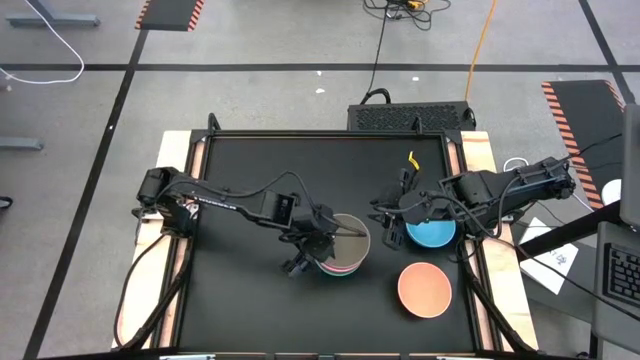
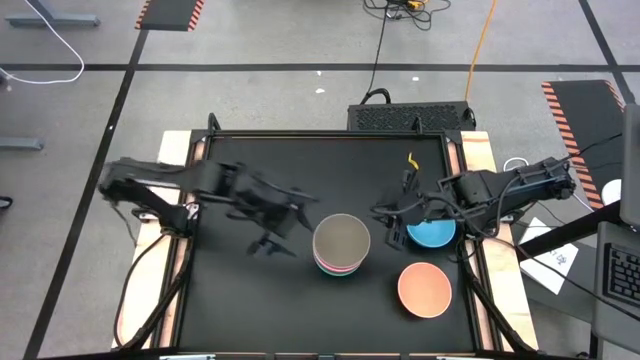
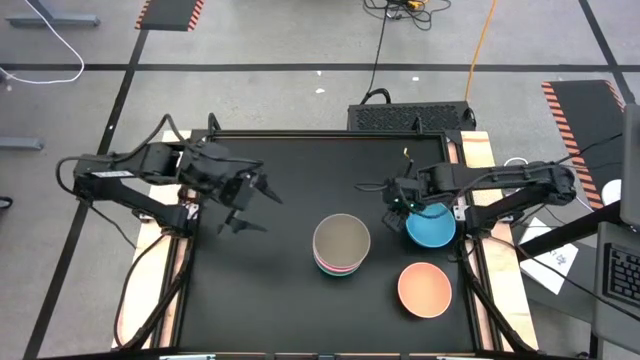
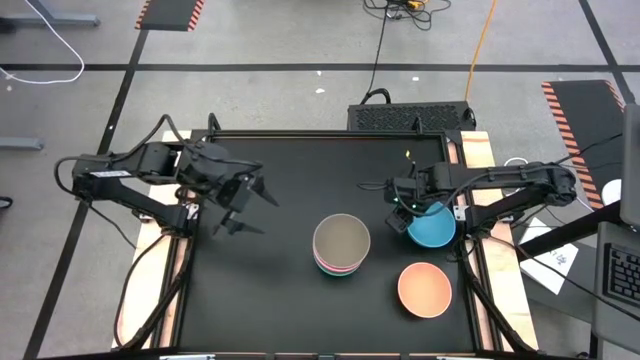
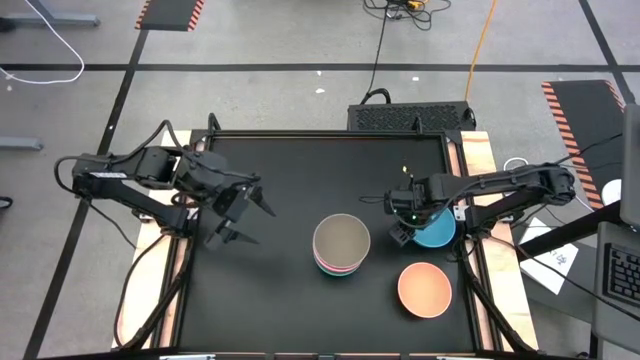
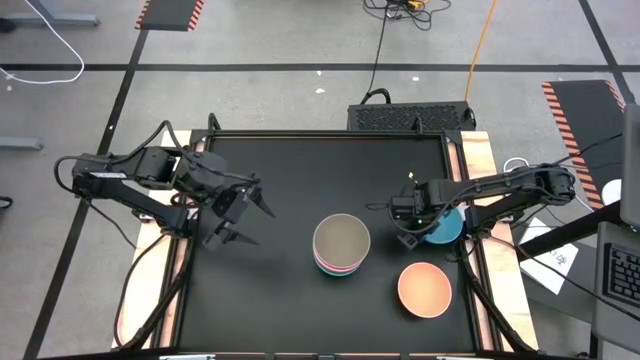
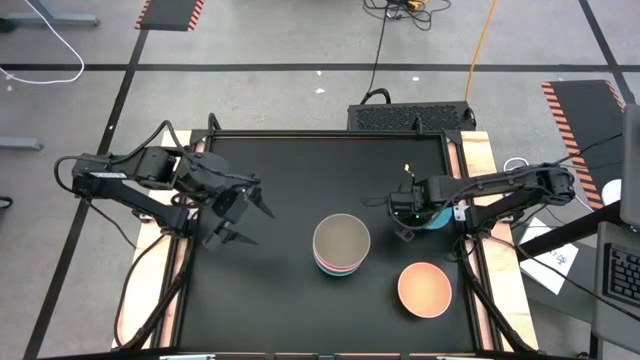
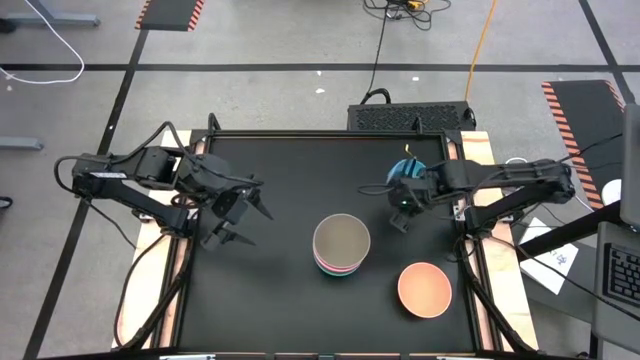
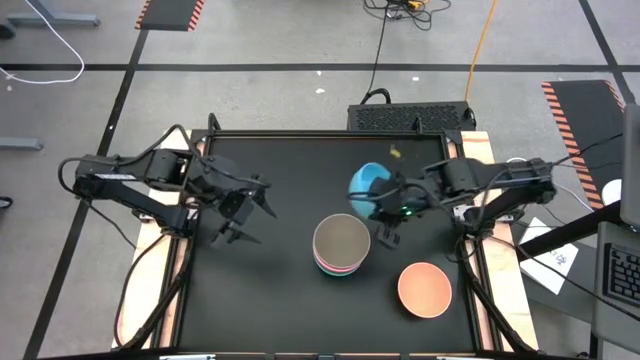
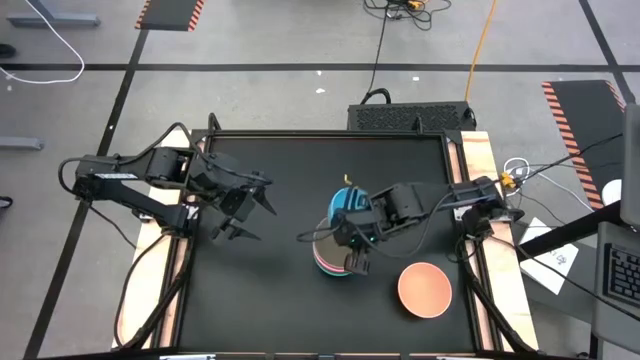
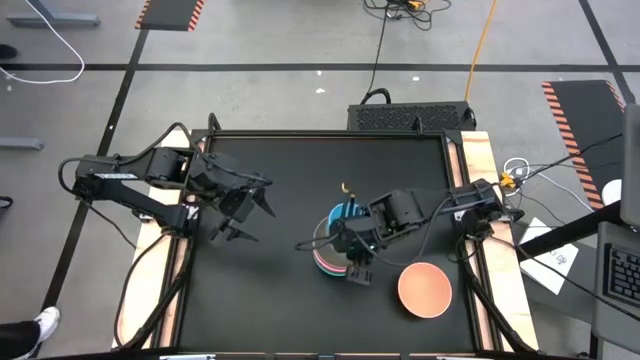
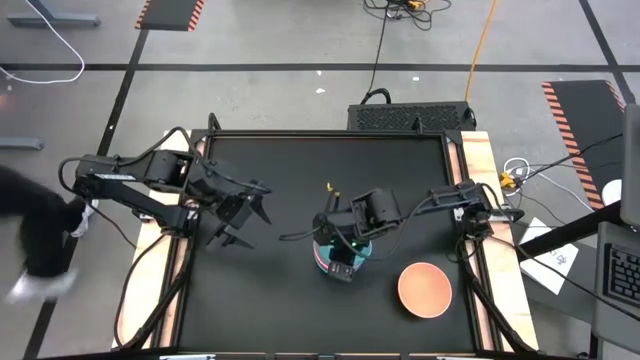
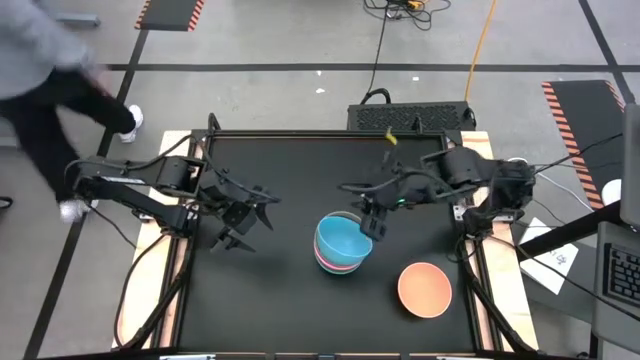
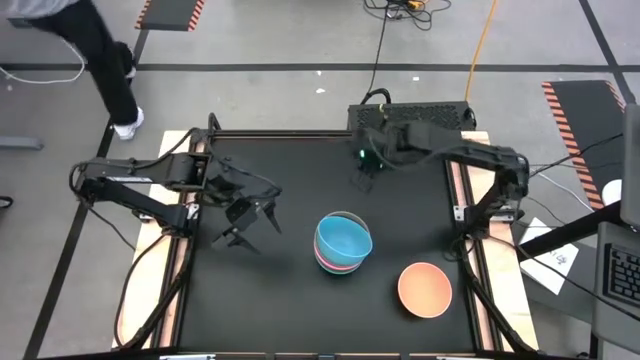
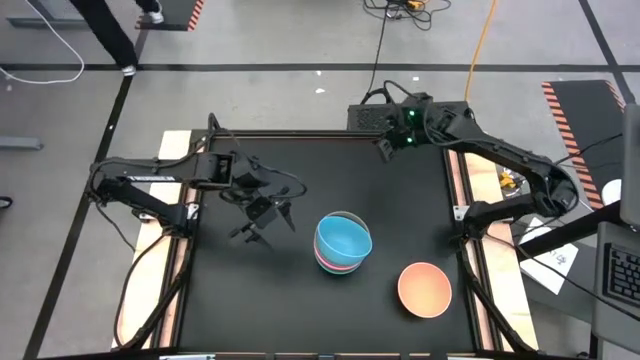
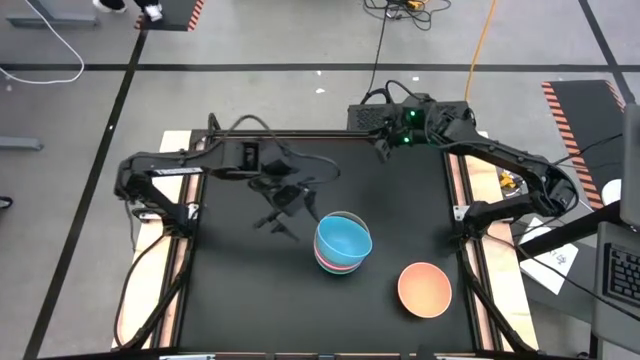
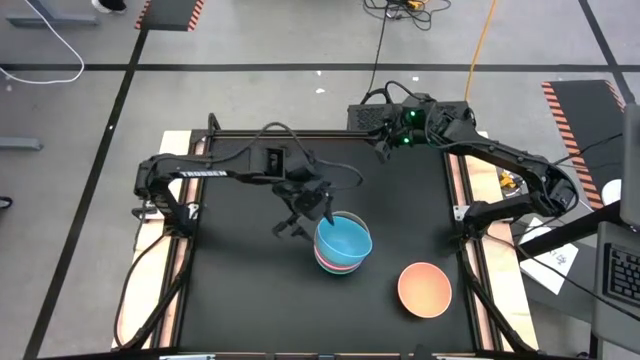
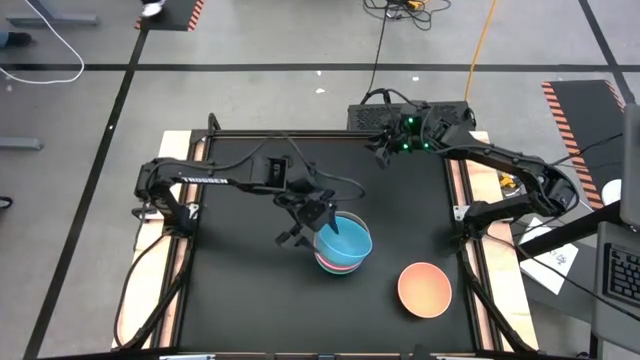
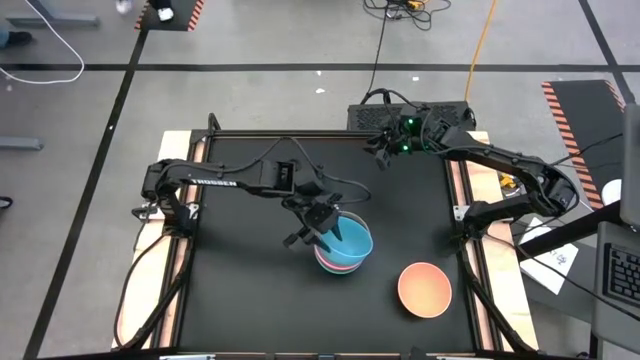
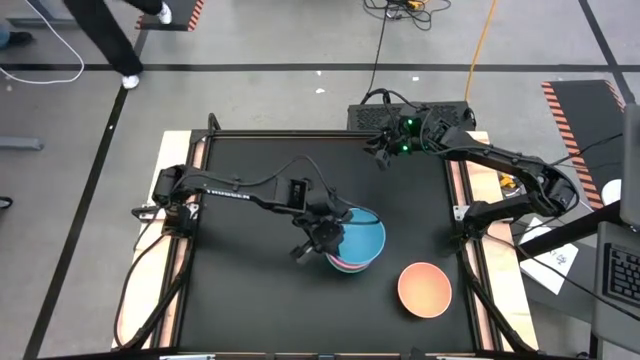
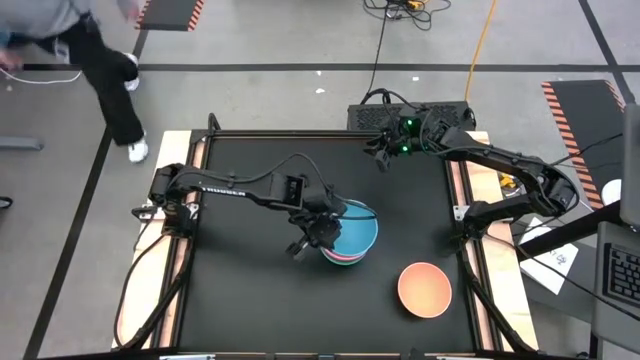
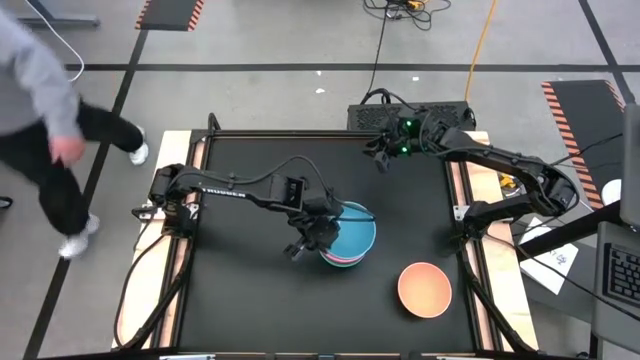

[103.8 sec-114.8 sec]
Task: Nest bowls inside each other
Stack the blue bowl on the gray bowl

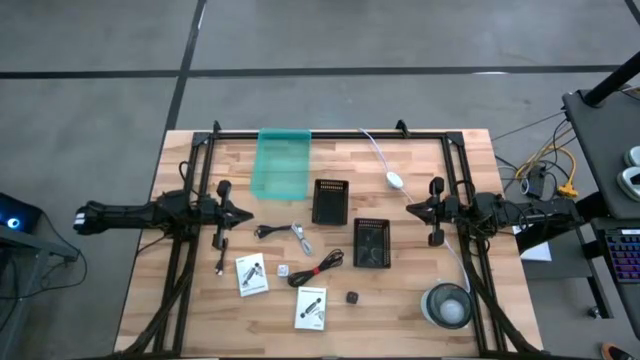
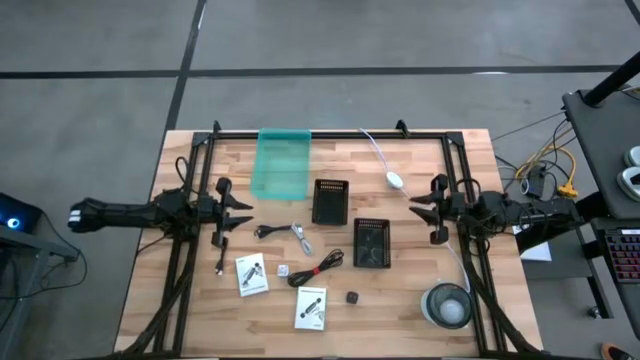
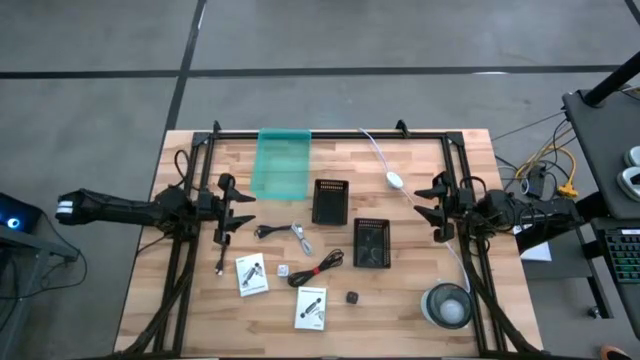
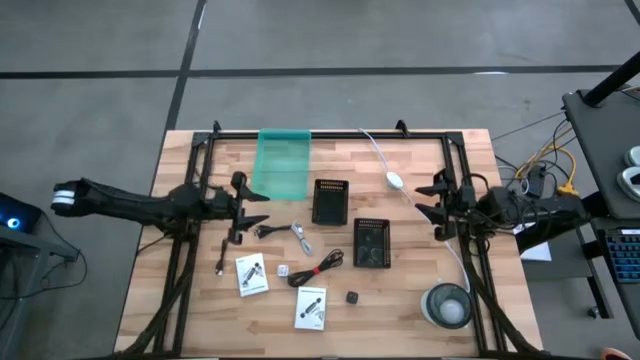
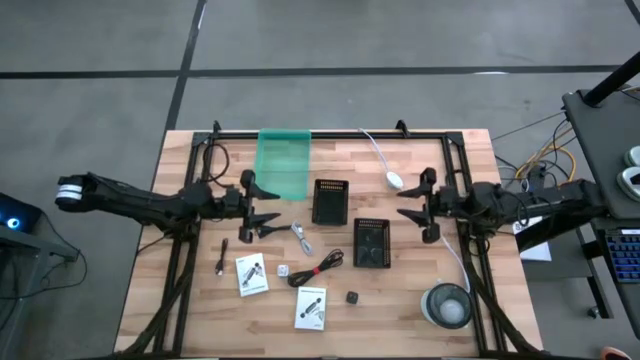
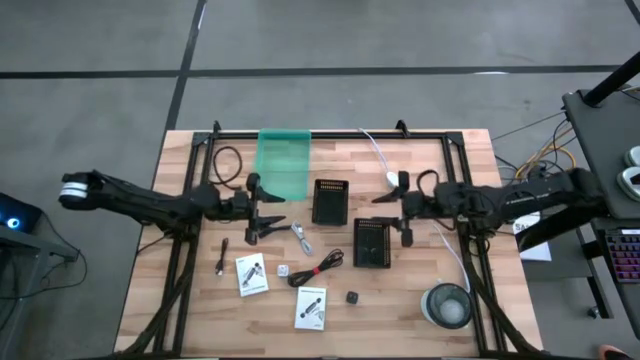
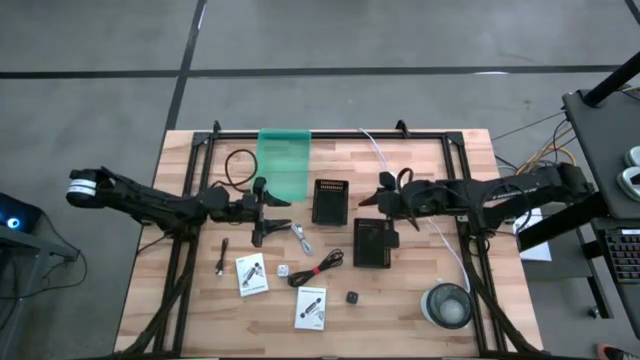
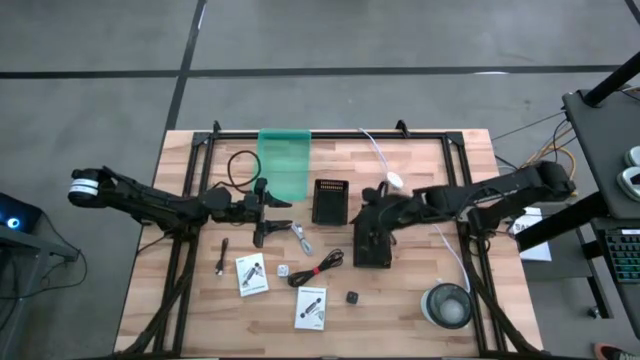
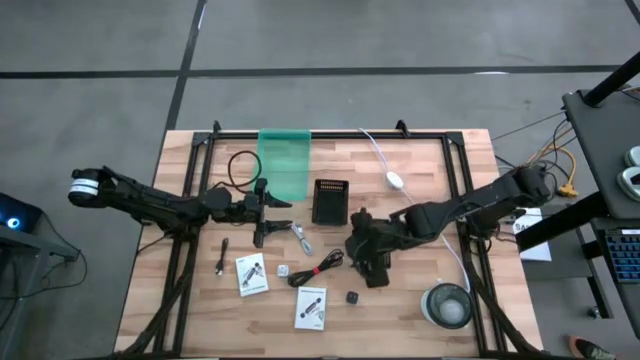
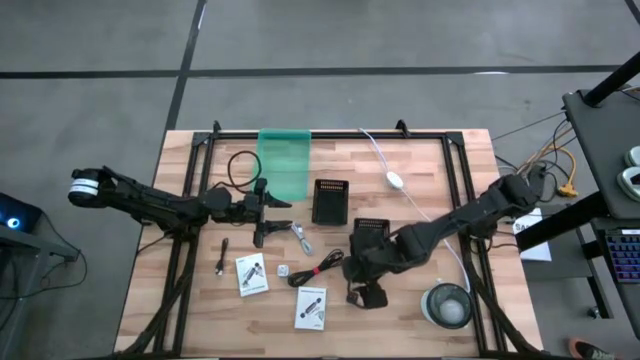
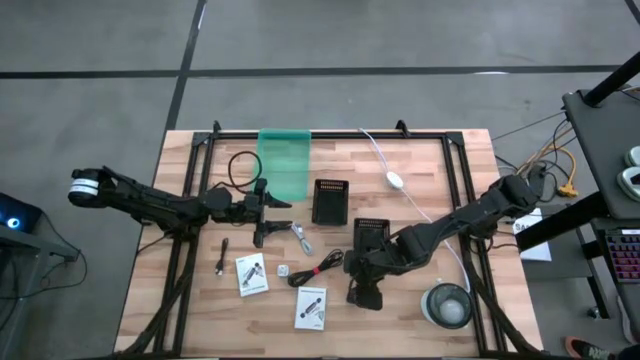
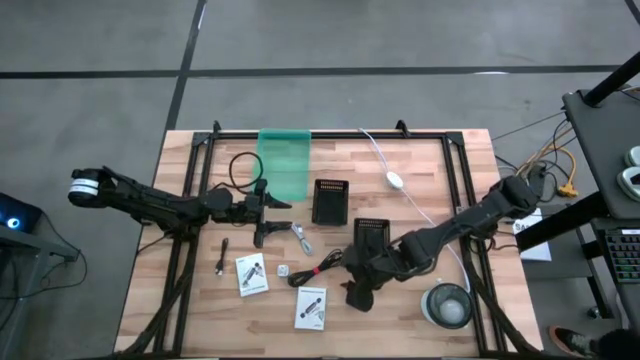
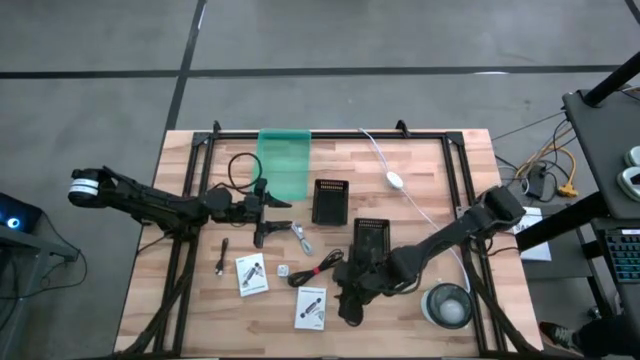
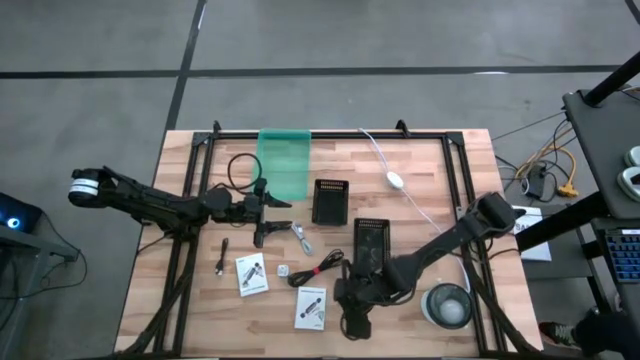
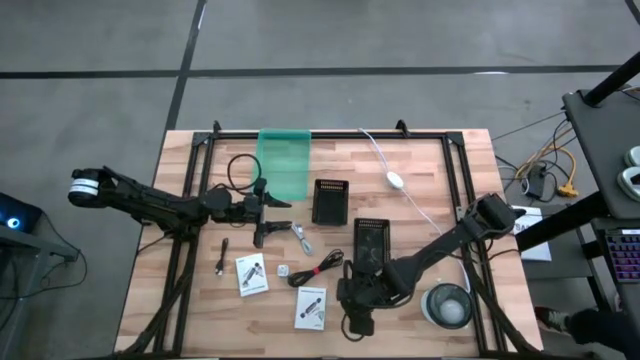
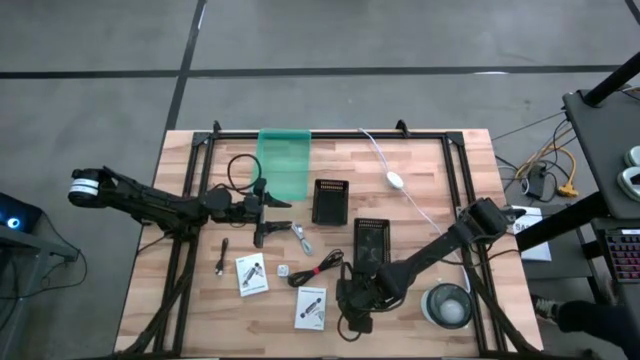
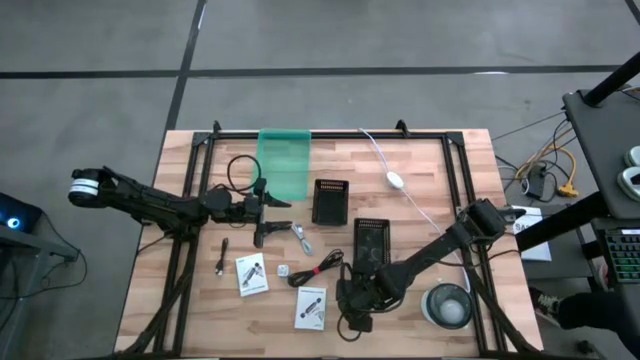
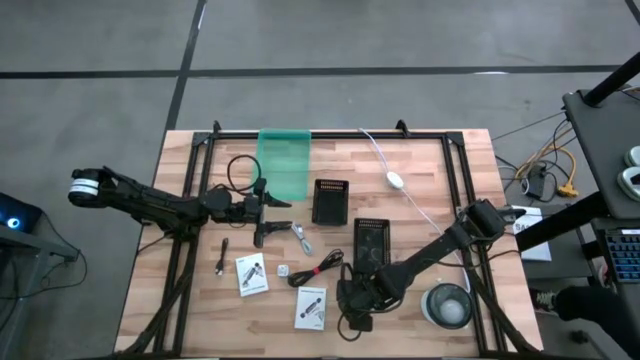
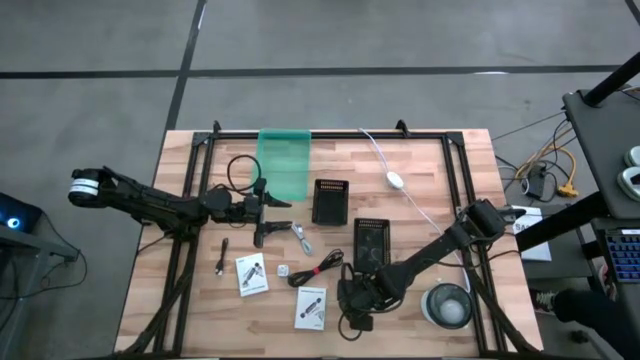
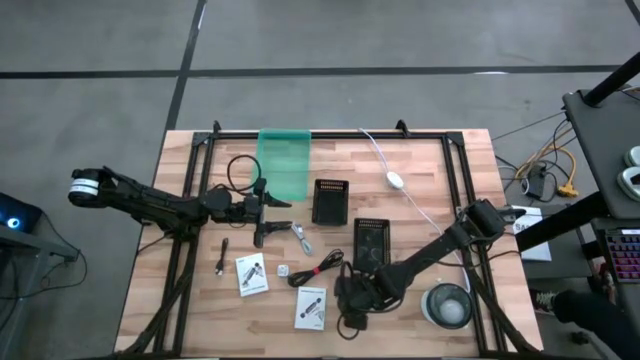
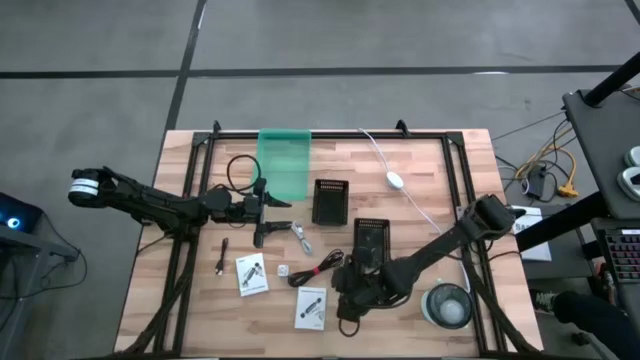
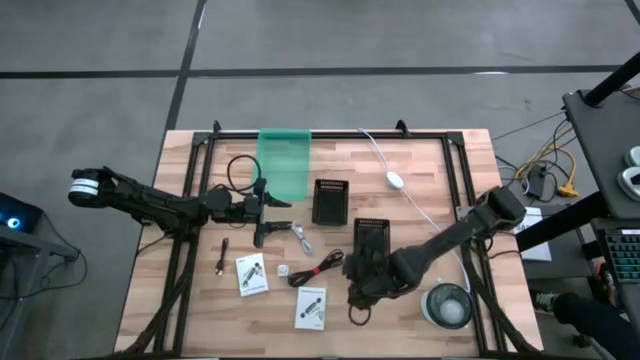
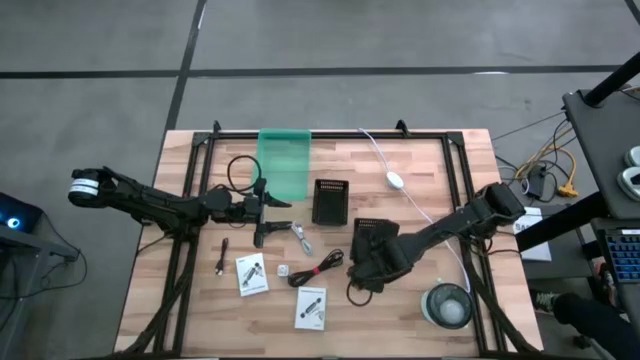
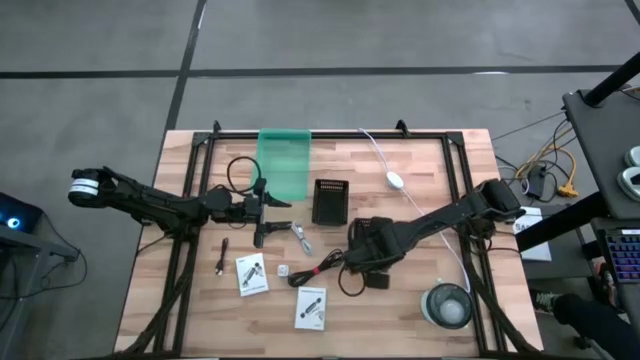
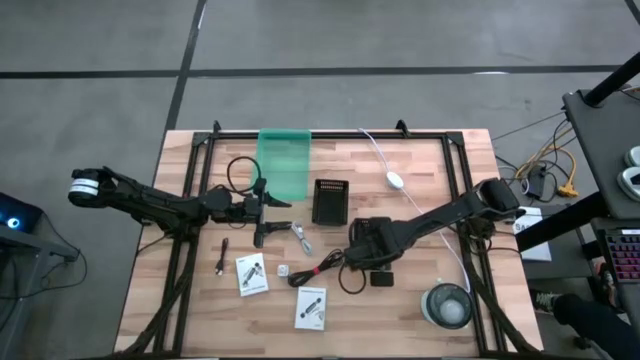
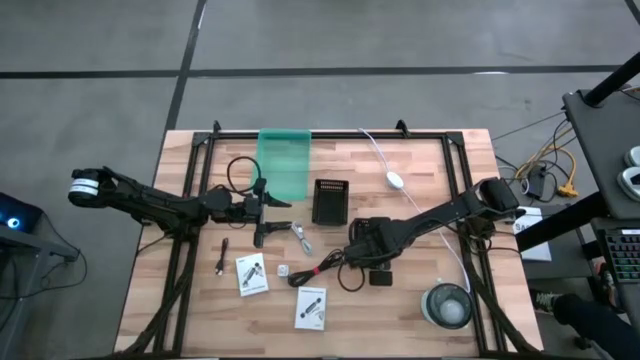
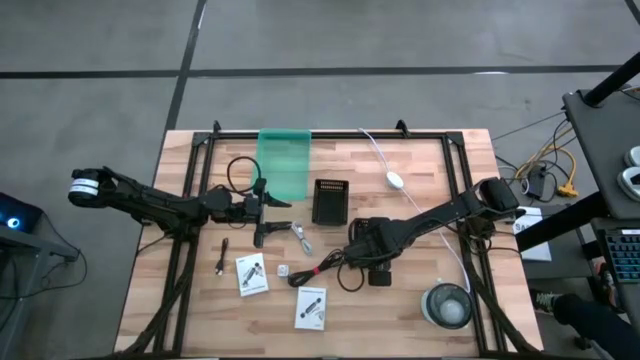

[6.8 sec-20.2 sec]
Task: Pick and place items into bin
Put the black charger adapter into the bottom black basket
